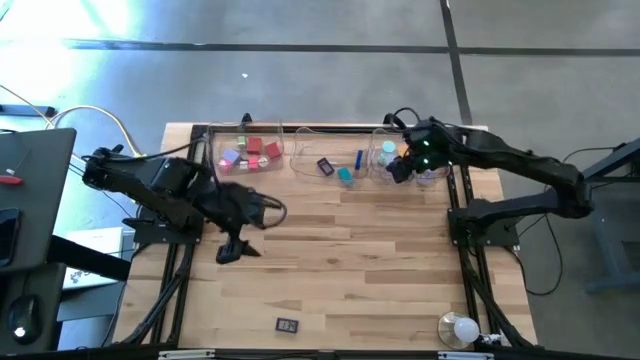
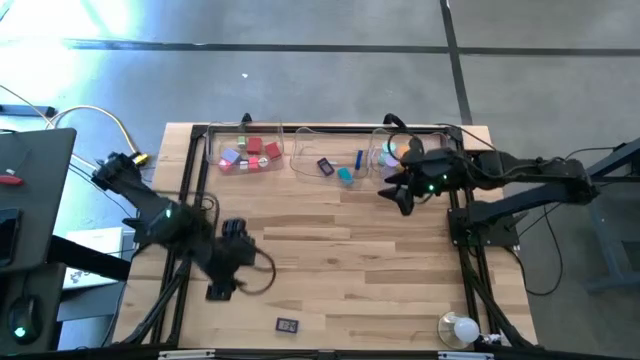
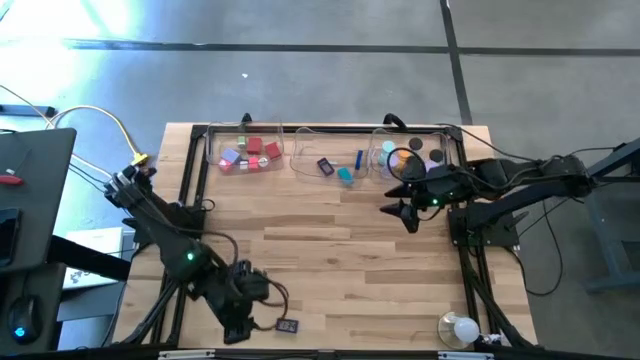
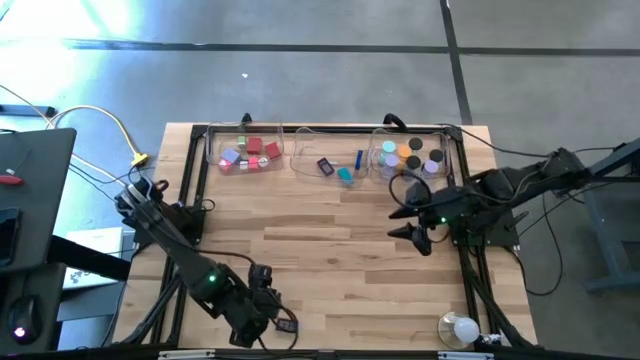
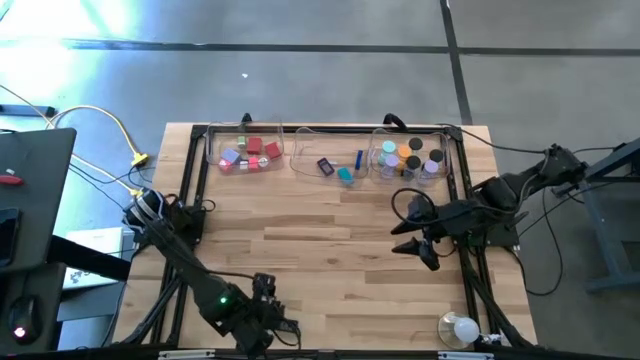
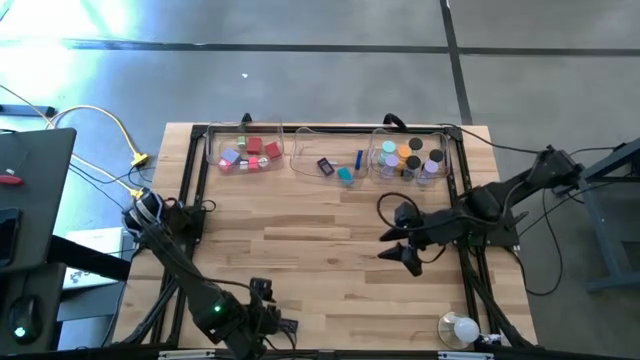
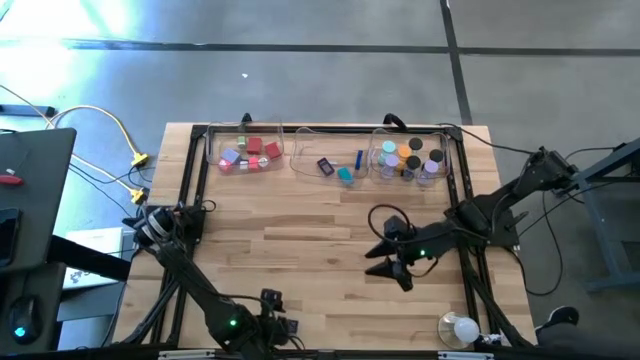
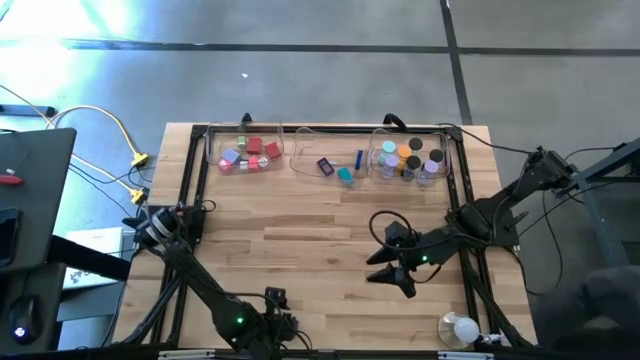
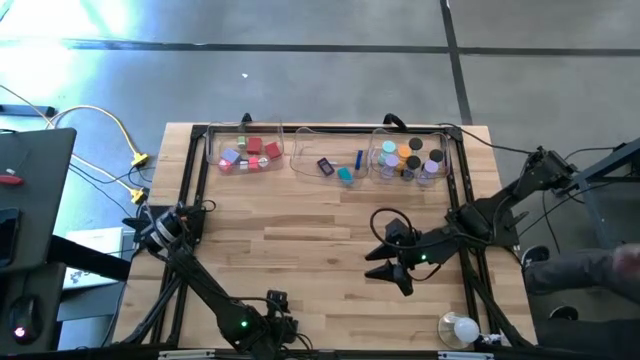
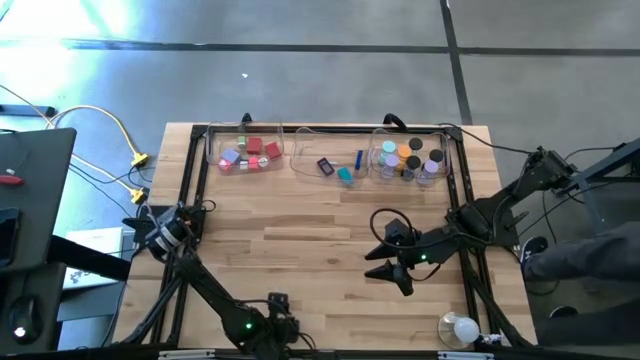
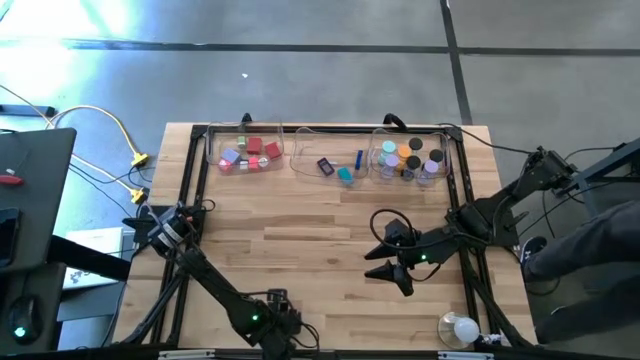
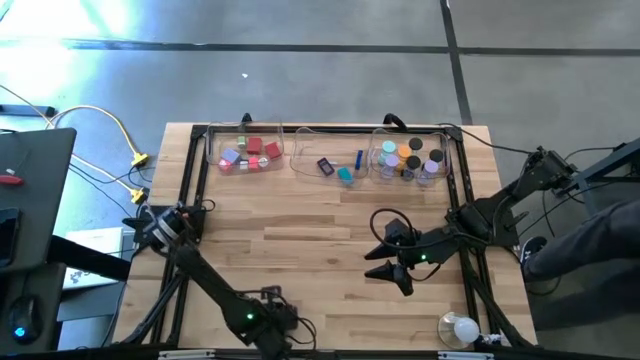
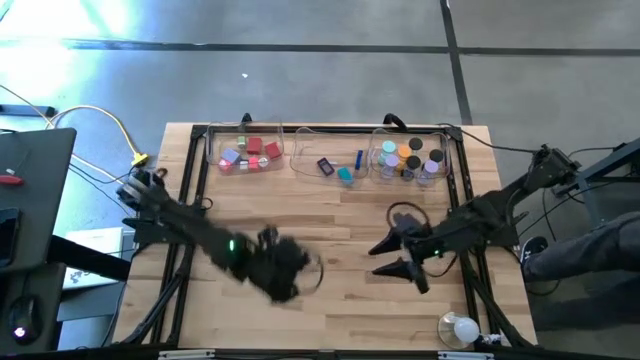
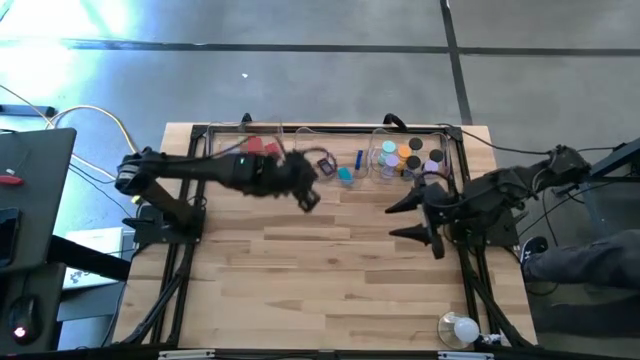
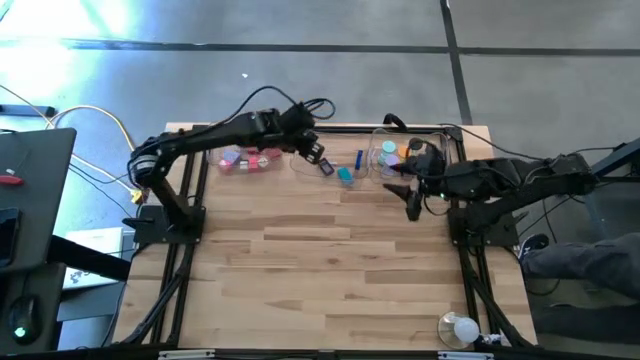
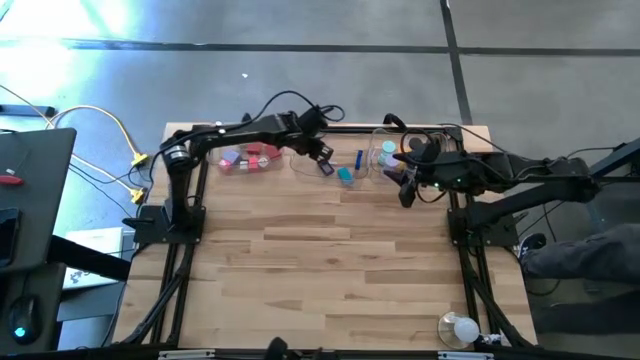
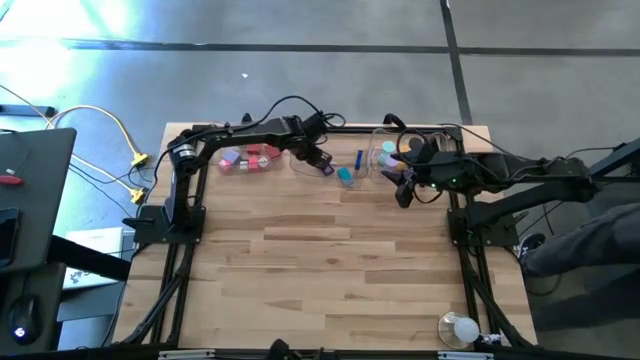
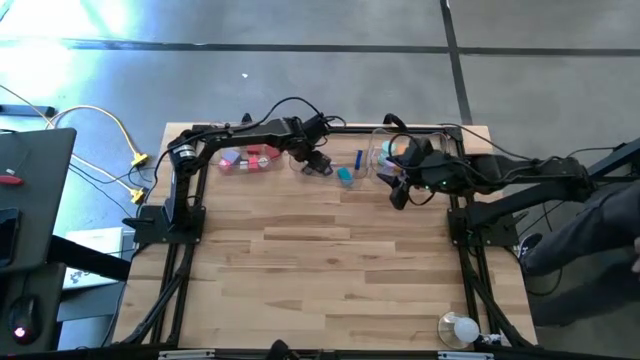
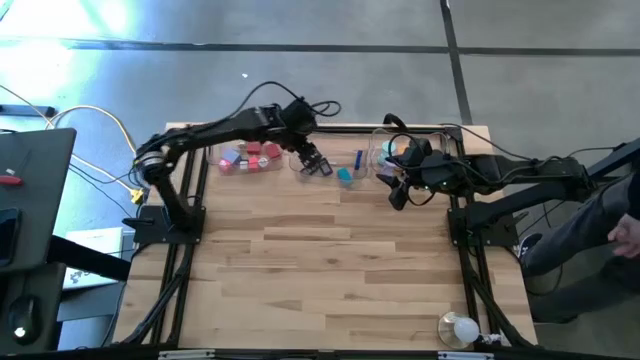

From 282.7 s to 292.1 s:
Task: Pick & Place Office items
Put the blue digital clock into the middle transparent bin

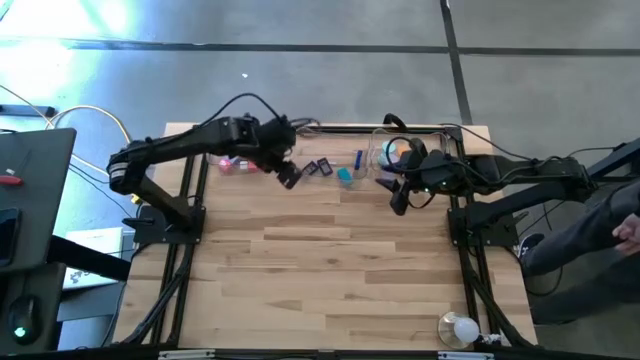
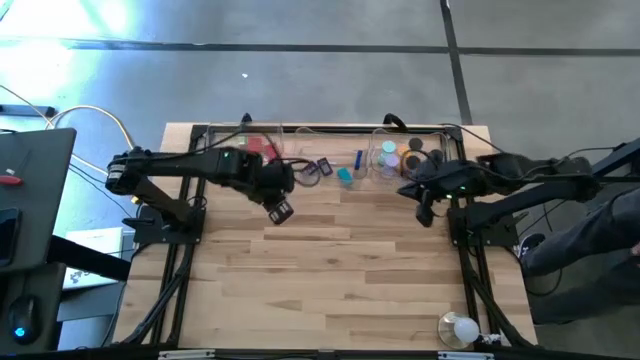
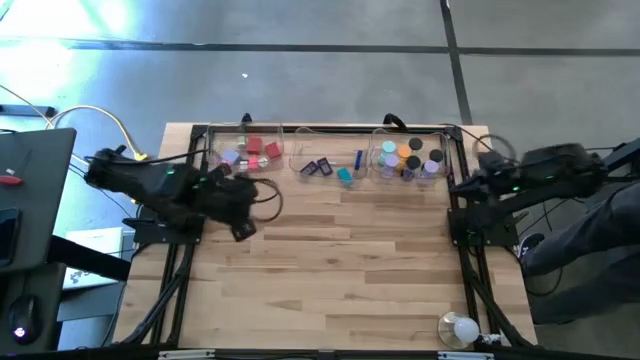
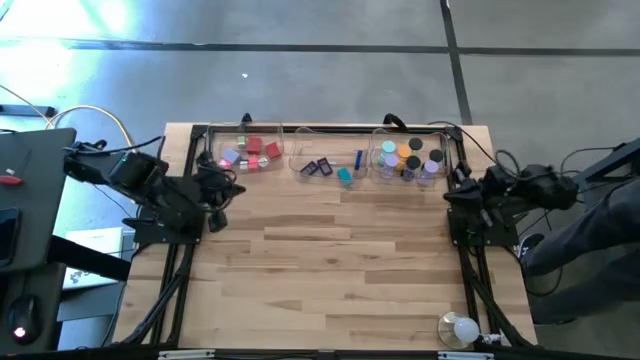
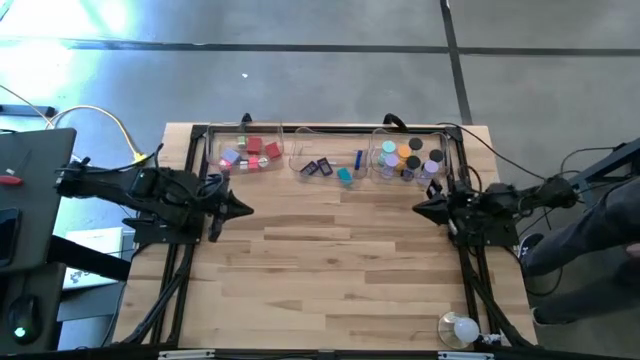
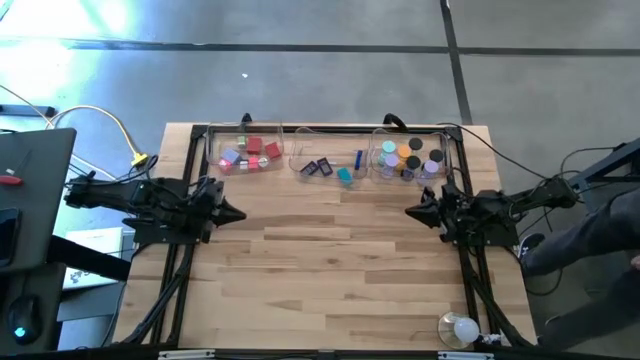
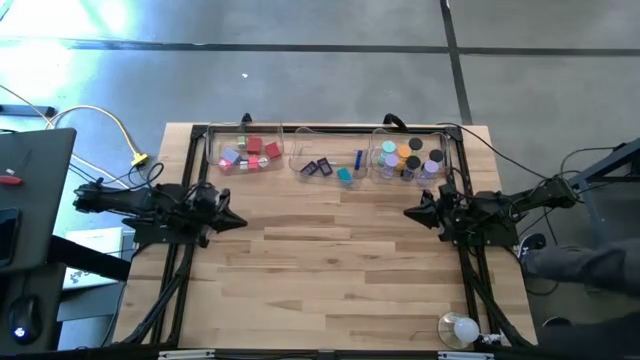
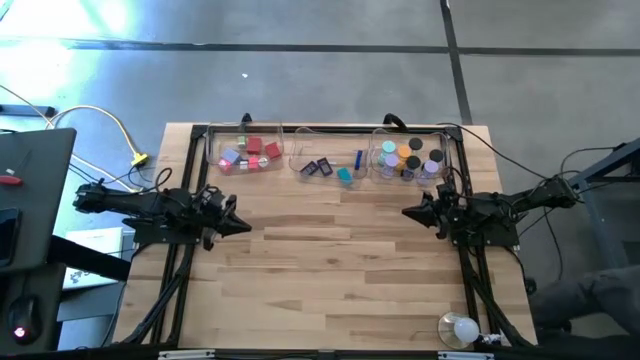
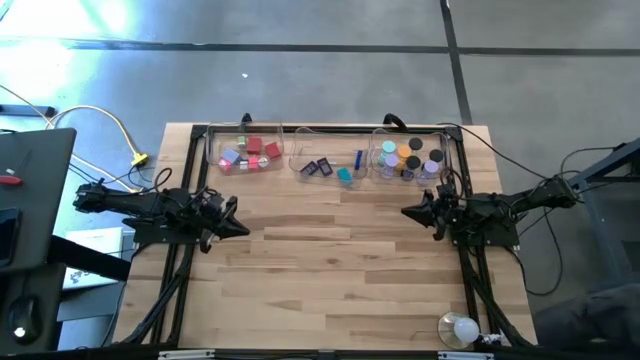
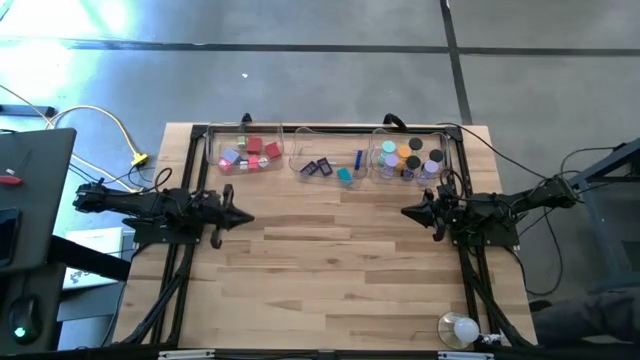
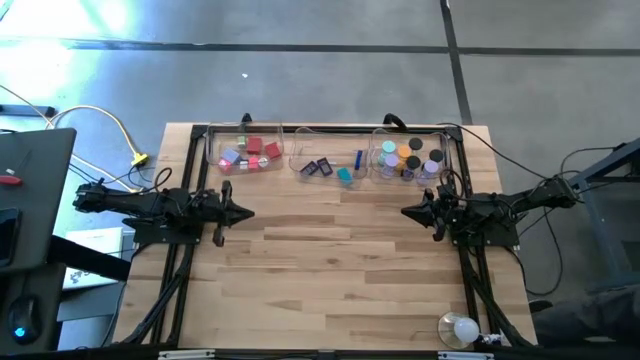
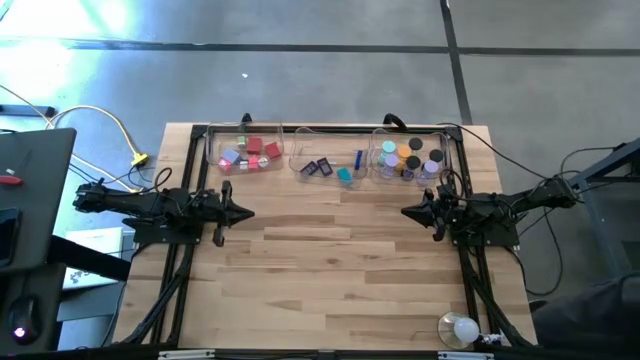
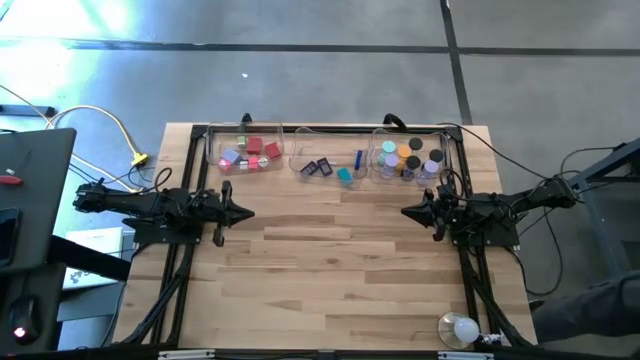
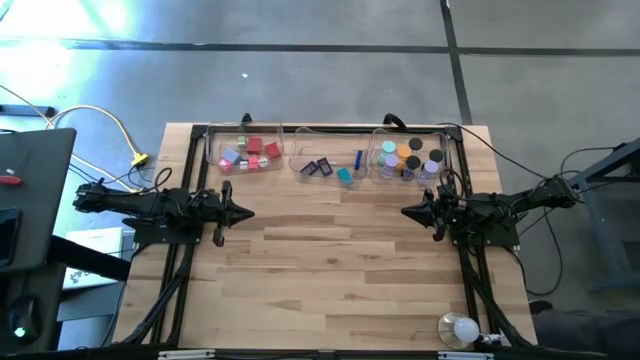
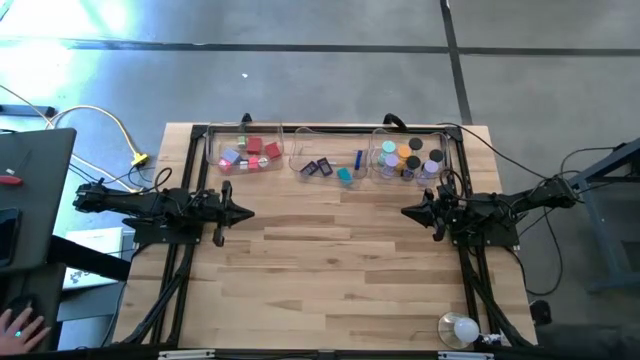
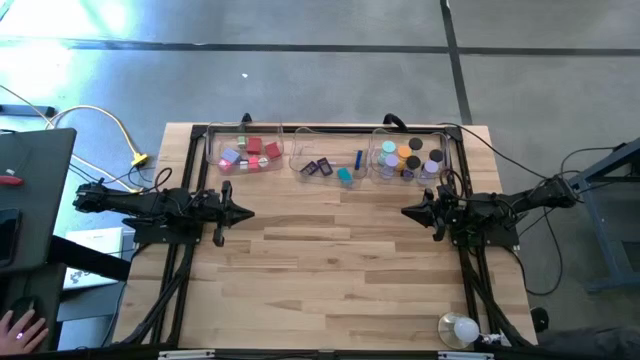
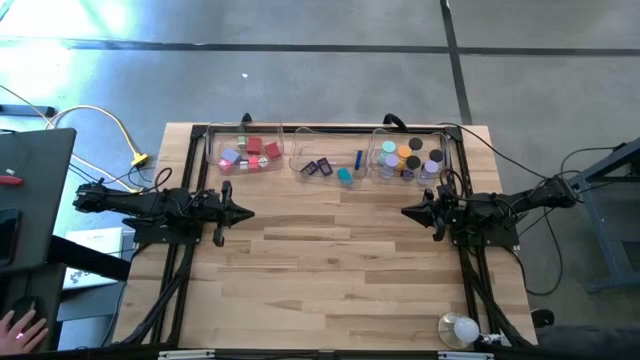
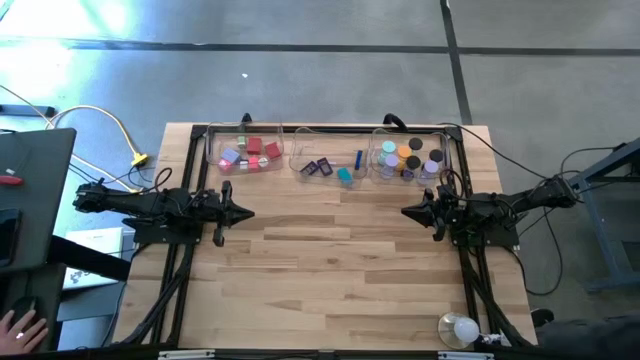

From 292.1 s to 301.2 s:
Return to Home Position

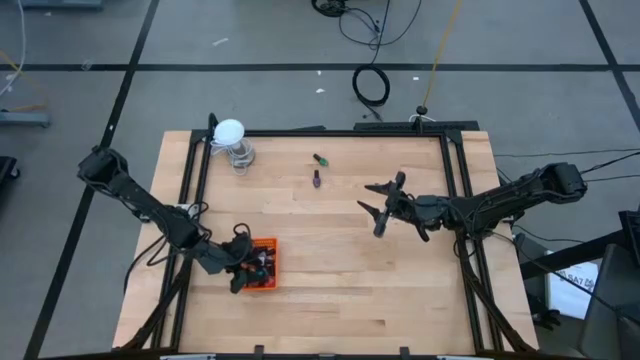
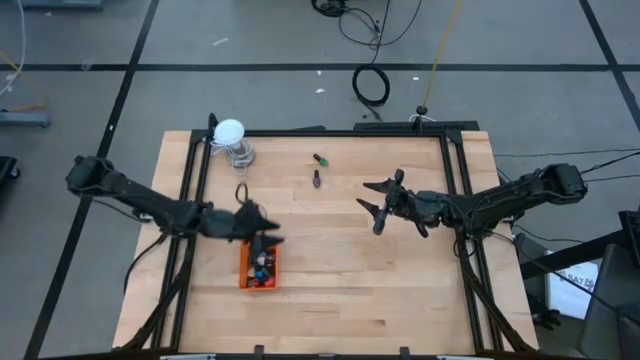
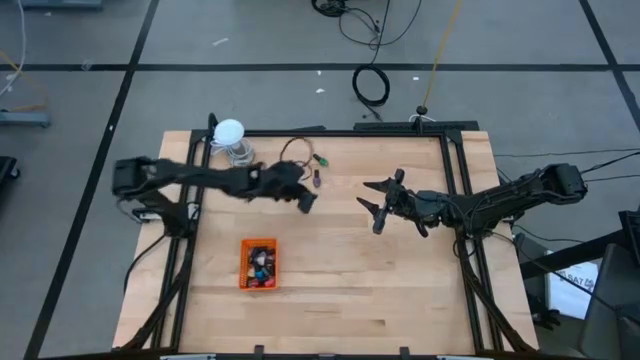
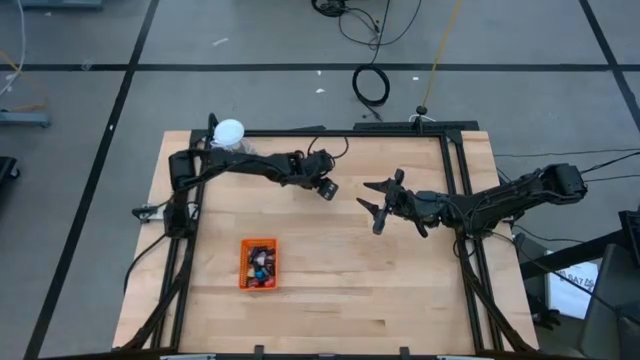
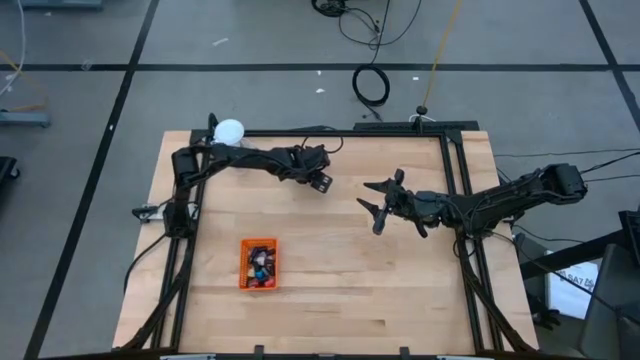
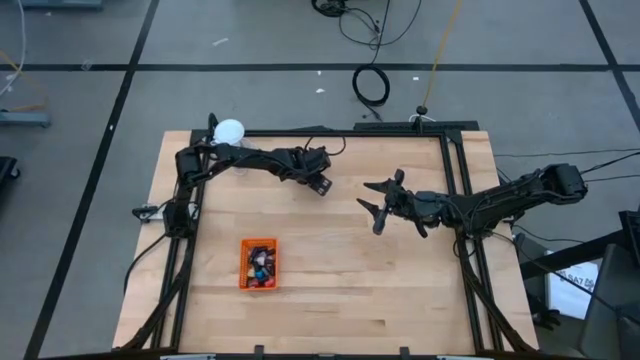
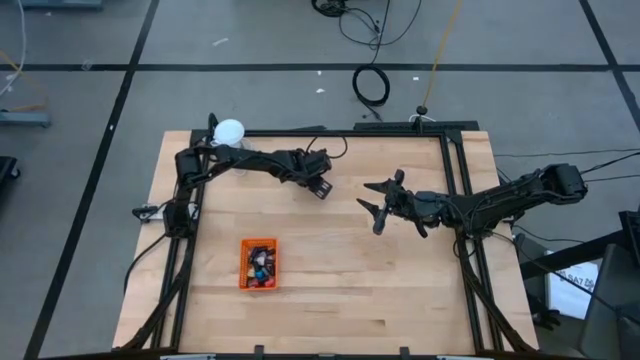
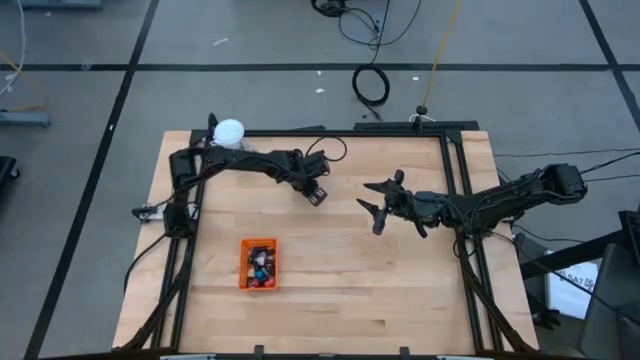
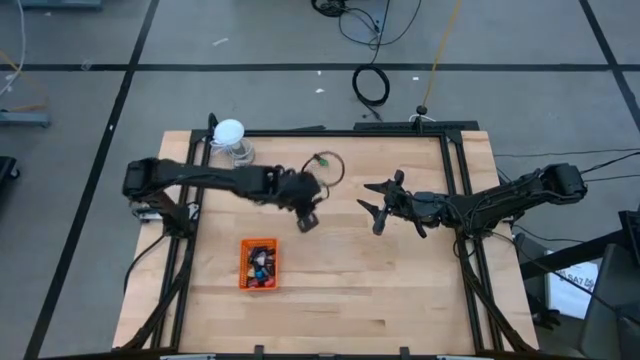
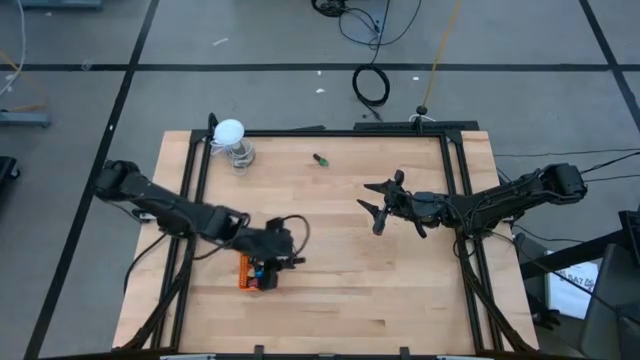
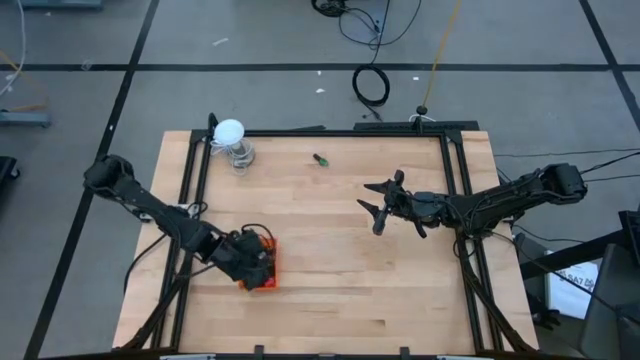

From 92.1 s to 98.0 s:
Task: Pick & Place Nail Polish
Put the purple nail color bottle into the orange bin
